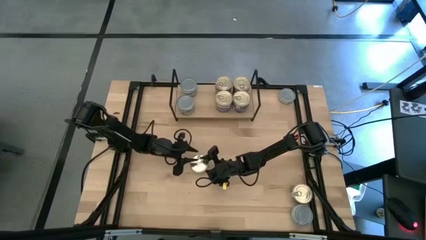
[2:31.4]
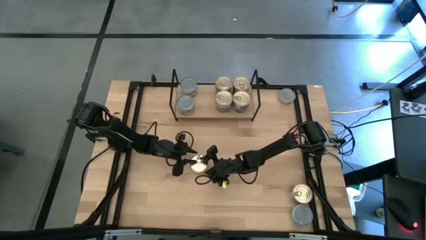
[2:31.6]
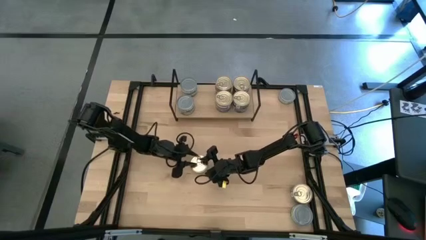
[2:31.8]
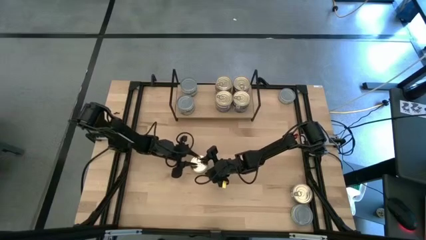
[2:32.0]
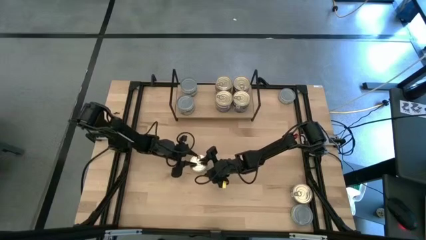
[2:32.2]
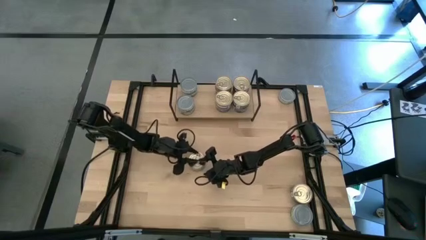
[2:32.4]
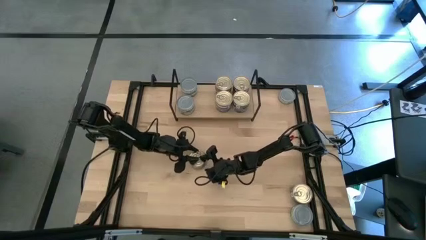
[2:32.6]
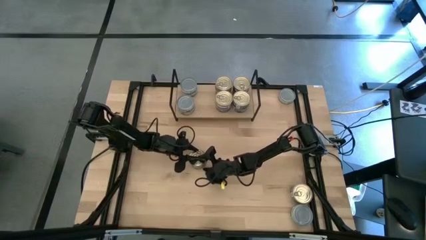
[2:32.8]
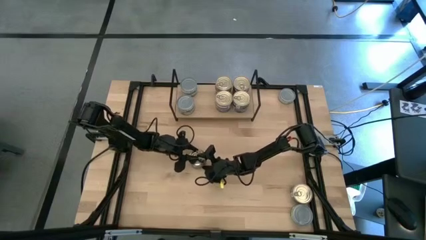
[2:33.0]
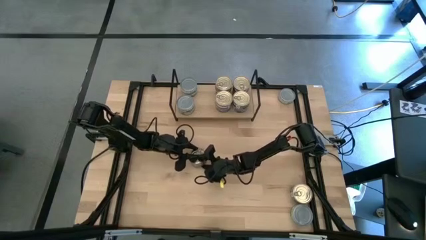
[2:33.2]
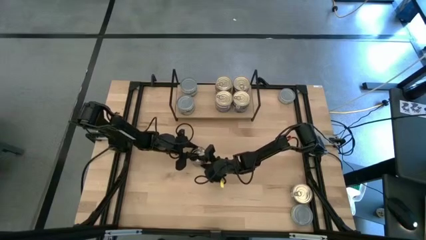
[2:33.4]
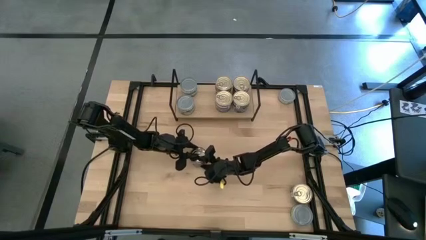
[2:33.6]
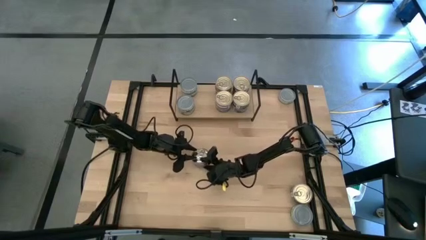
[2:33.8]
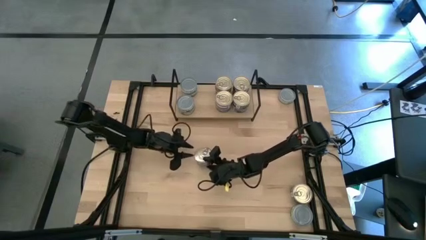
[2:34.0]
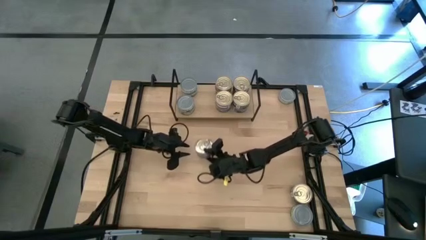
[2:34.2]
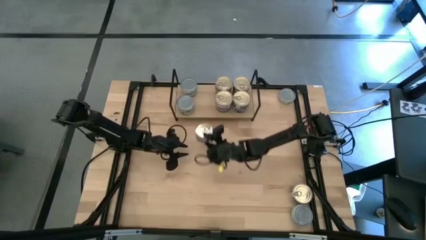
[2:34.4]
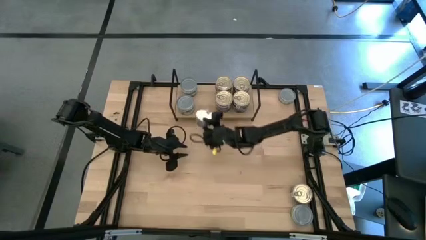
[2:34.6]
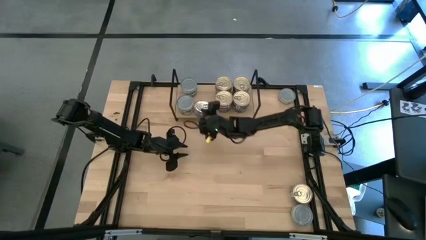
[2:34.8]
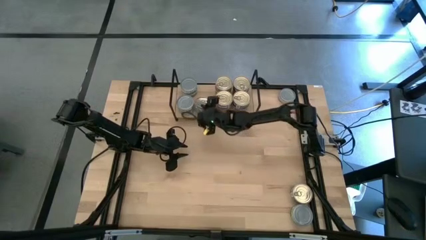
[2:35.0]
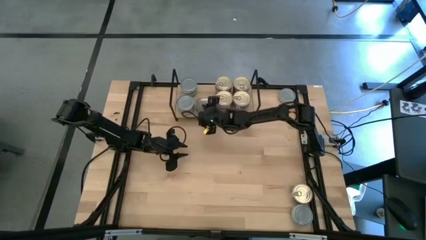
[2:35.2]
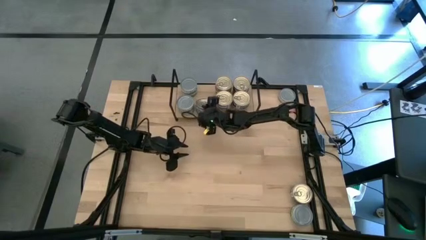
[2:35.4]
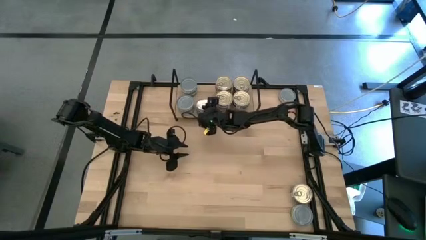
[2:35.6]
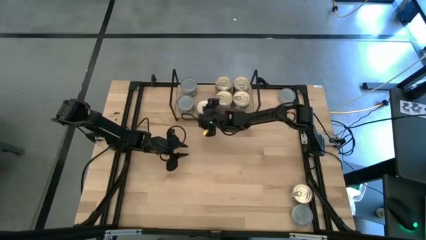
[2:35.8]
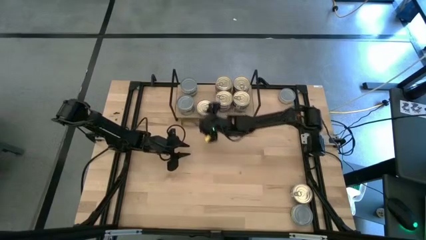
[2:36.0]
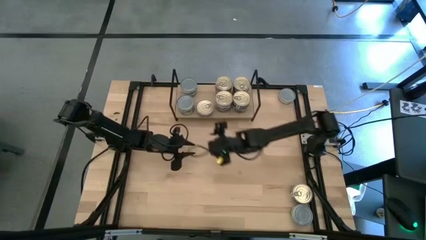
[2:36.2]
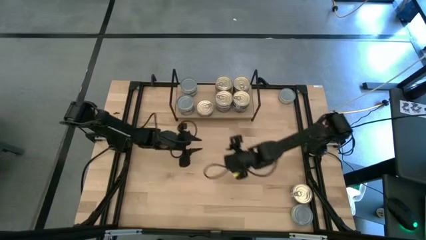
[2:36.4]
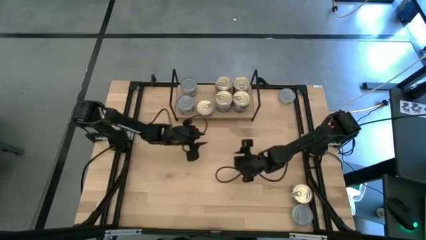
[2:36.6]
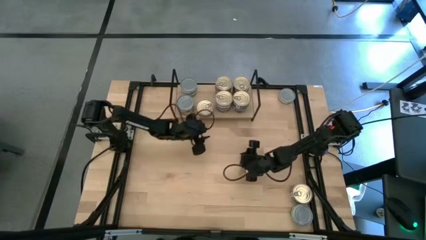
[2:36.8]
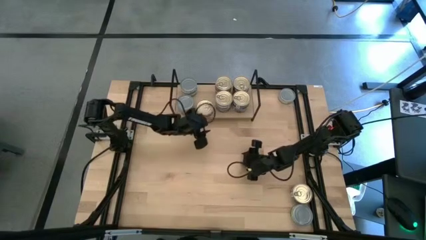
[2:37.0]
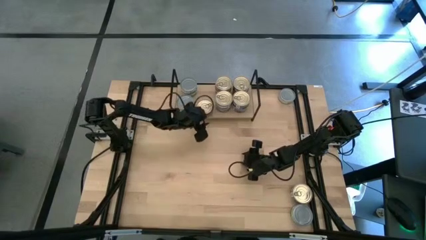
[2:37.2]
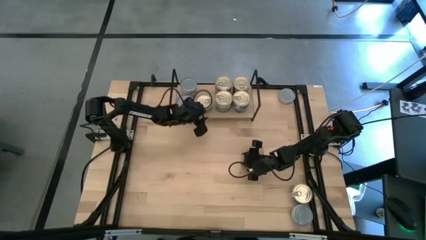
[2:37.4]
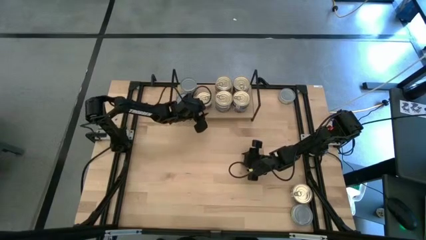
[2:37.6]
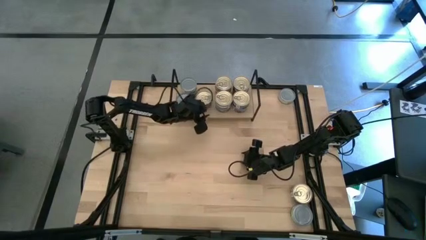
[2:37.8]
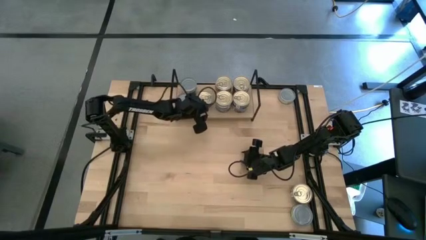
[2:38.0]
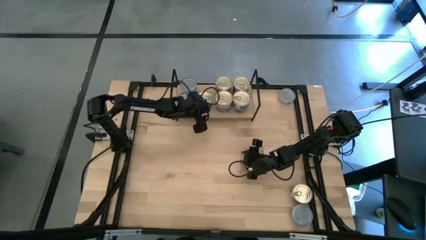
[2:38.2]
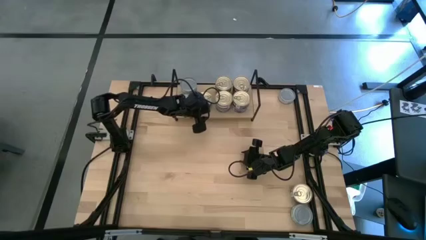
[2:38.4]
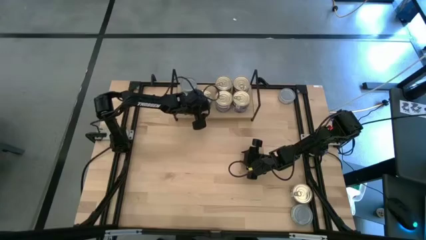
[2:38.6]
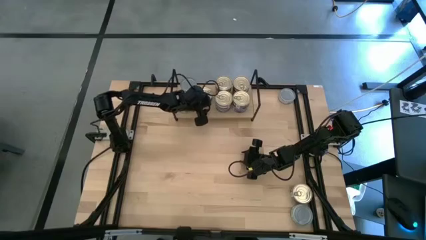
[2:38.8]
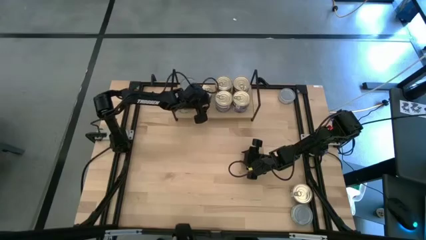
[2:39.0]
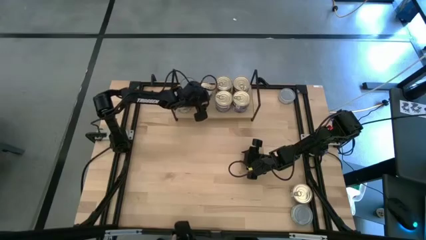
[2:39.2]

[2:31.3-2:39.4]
Task: Stack canned seafood by type on shelf
Put the blue and pink tuna can on the shelf

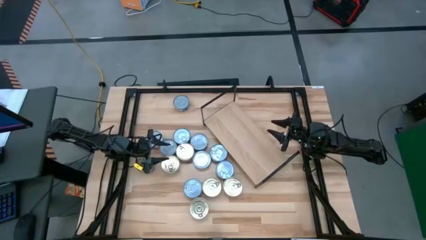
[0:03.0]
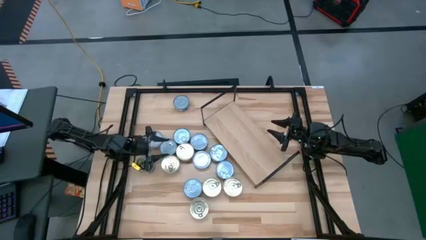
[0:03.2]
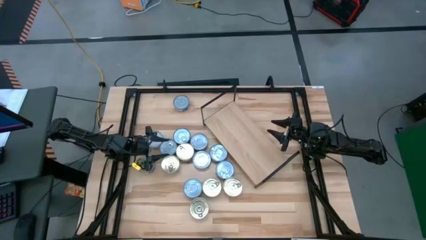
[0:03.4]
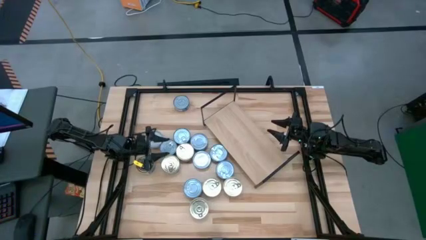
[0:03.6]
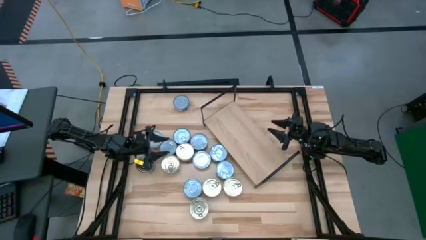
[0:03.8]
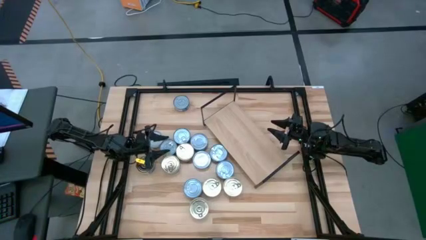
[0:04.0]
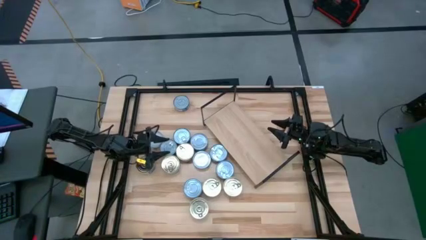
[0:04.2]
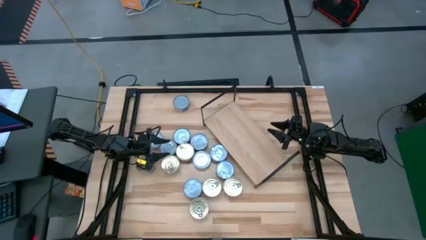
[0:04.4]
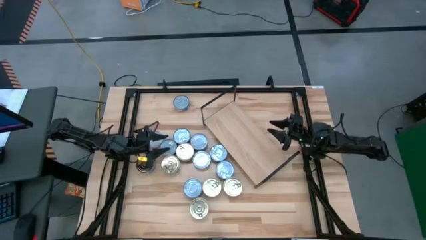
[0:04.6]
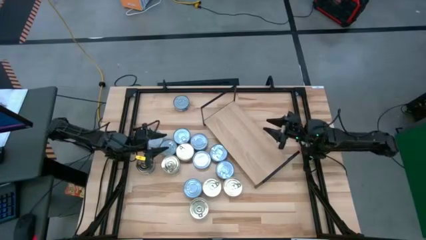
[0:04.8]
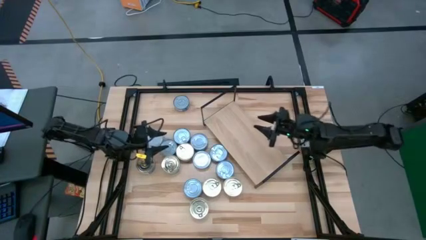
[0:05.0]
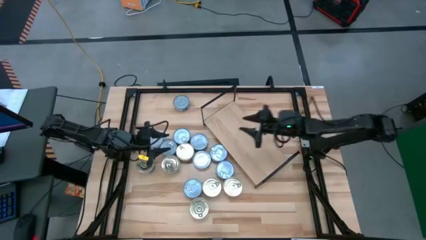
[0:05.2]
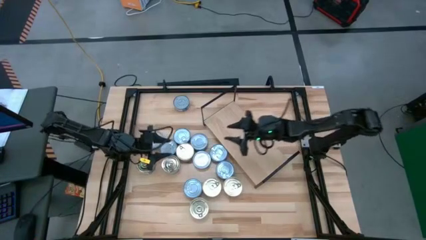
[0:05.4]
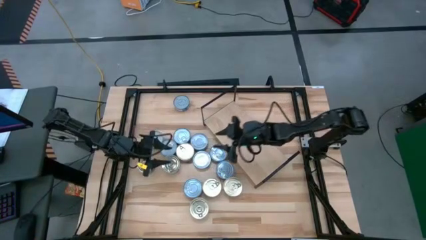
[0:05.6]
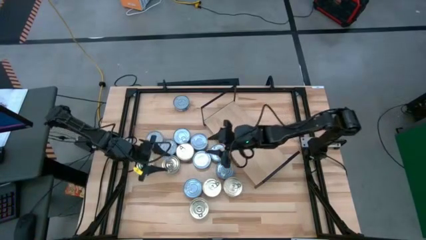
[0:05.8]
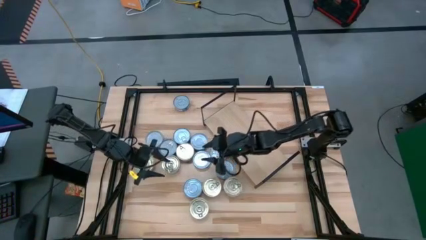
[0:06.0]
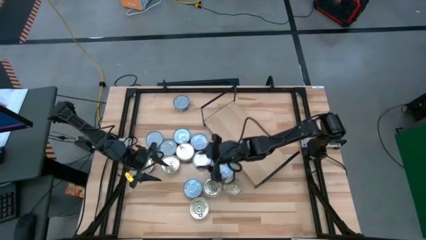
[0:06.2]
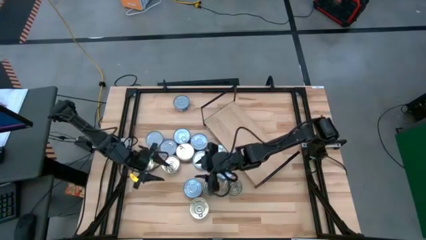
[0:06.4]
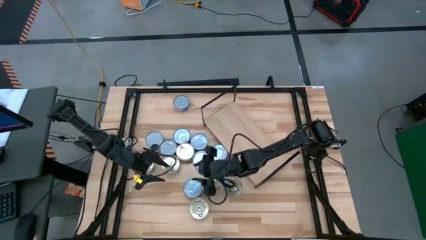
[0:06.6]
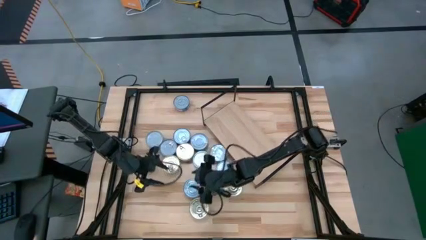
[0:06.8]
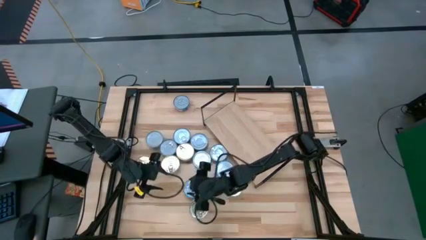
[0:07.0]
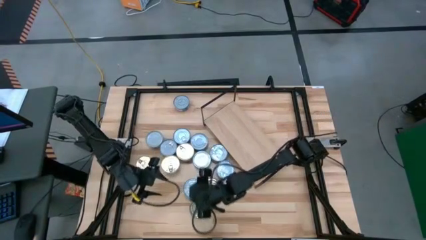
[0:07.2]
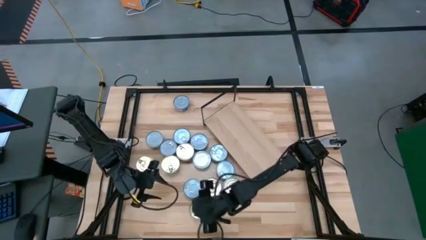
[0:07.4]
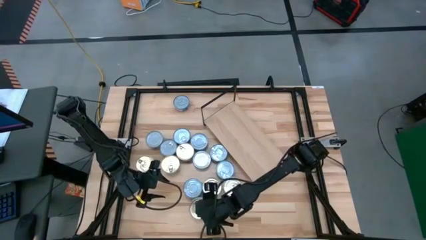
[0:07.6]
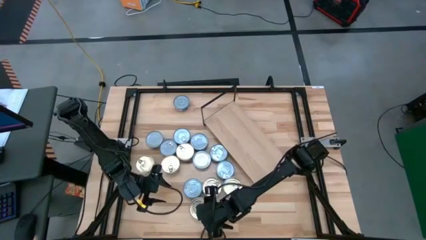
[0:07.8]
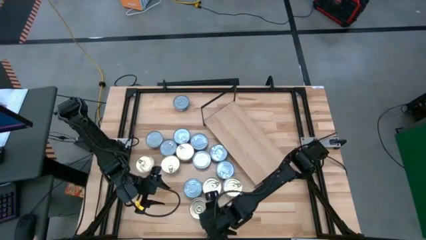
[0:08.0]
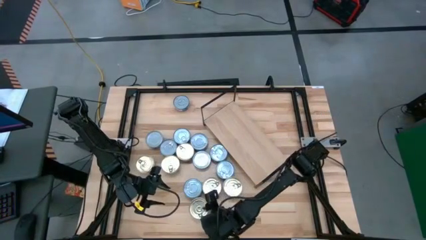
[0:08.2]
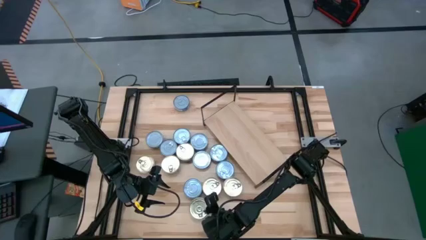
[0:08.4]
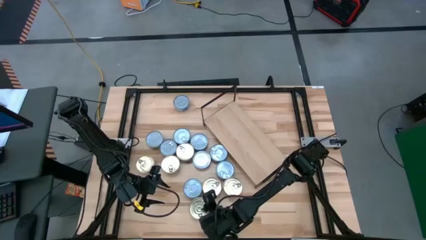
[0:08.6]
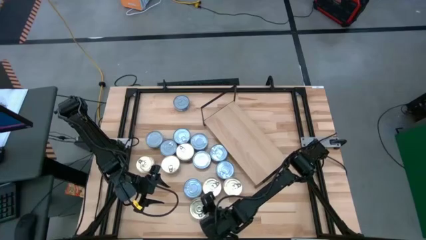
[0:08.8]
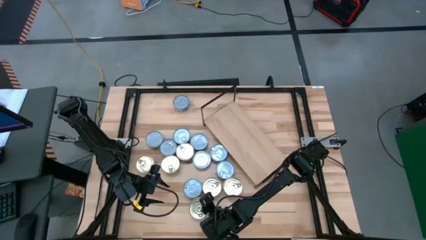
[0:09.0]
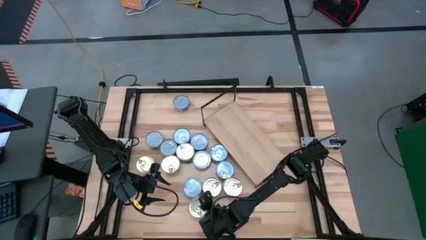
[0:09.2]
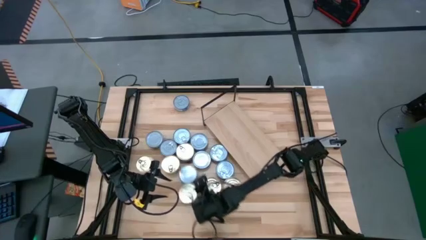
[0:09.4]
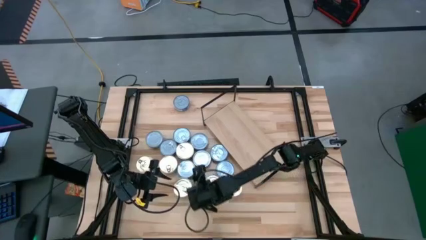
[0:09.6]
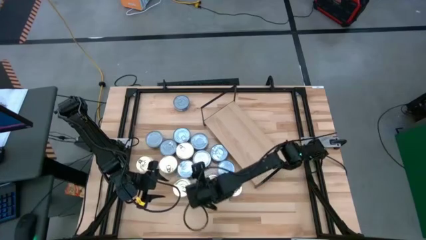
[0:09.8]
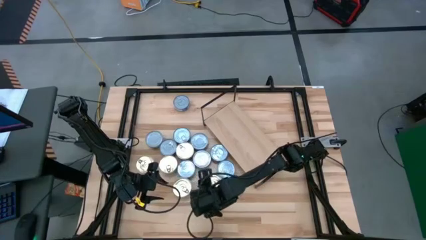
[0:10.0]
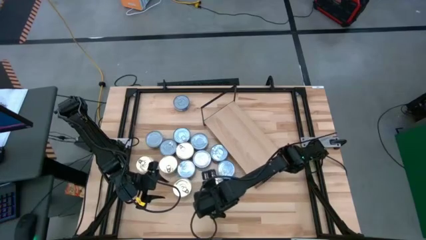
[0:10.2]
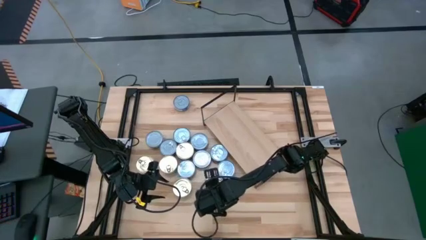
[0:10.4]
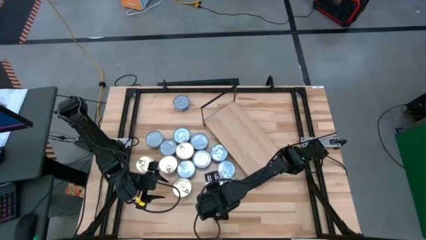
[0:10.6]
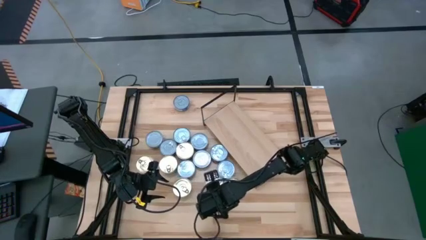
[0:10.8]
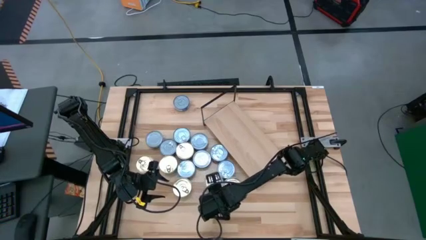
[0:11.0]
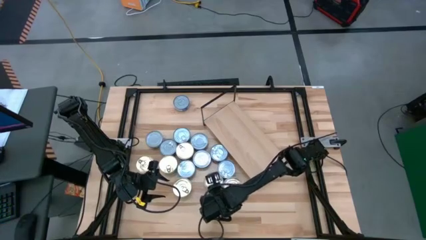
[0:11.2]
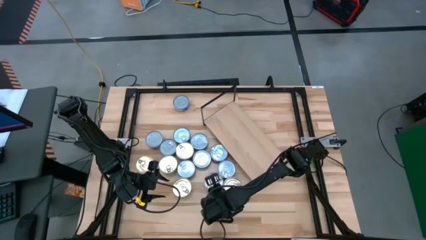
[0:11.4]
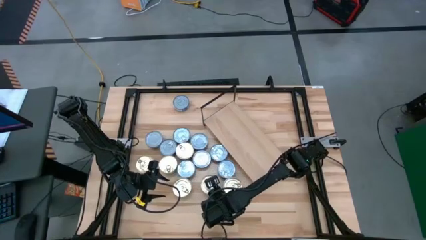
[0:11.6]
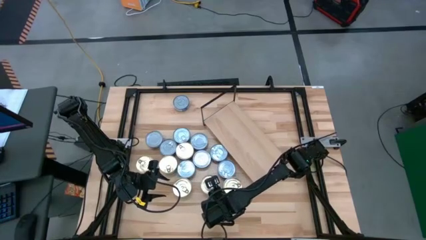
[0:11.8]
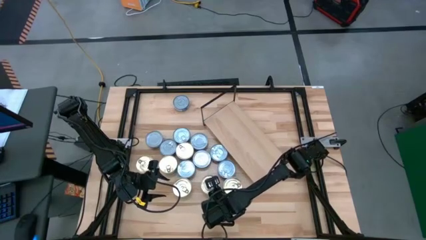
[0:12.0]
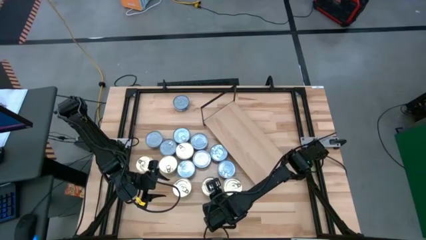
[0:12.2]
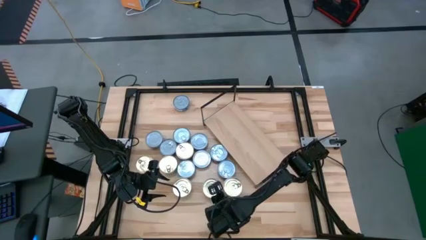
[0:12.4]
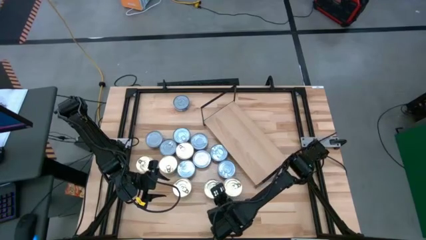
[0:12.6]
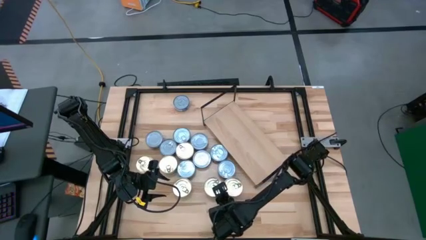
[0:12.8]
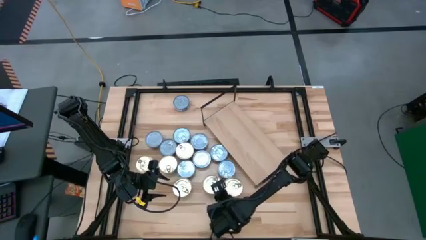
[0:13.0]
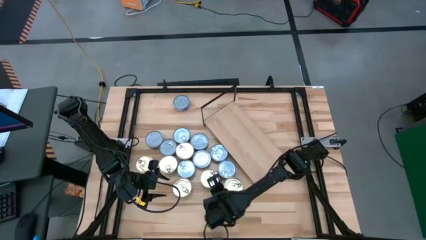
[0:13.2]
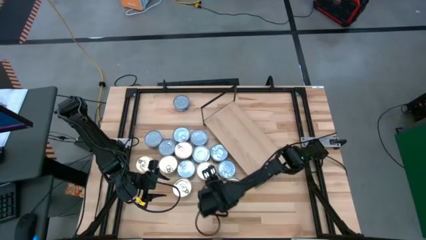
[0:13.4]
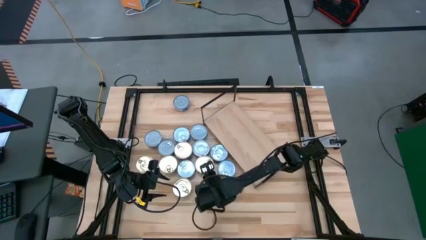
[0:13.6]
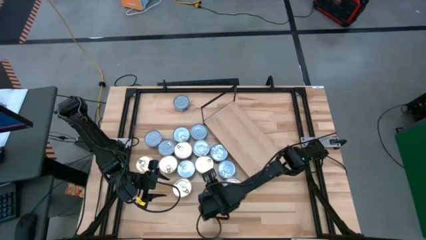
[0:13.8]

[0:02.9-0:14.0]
Task: Stack canned seafood by type on shelf
Put the blue tuna can on the shelf
